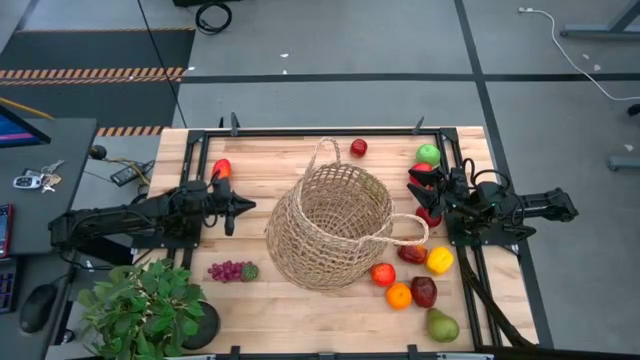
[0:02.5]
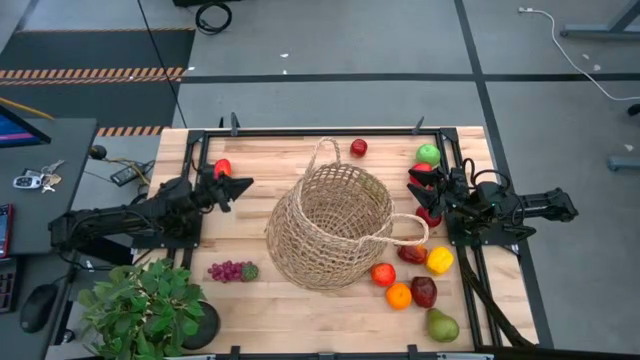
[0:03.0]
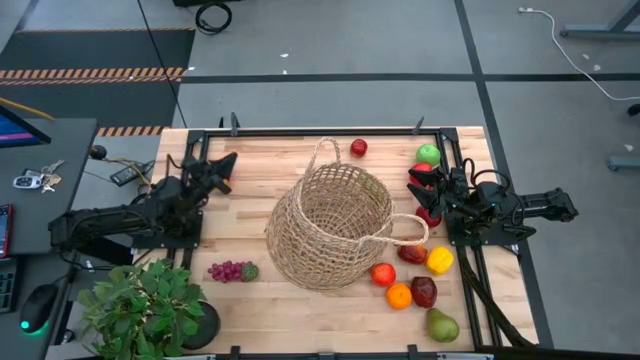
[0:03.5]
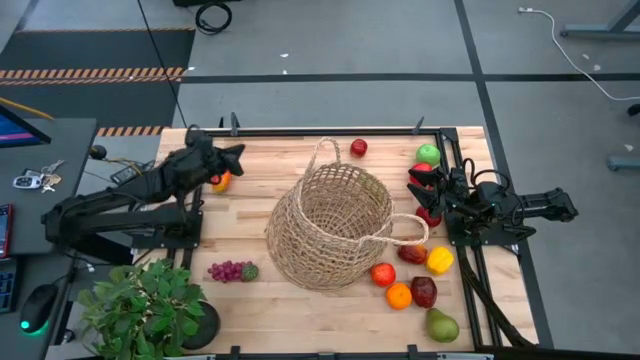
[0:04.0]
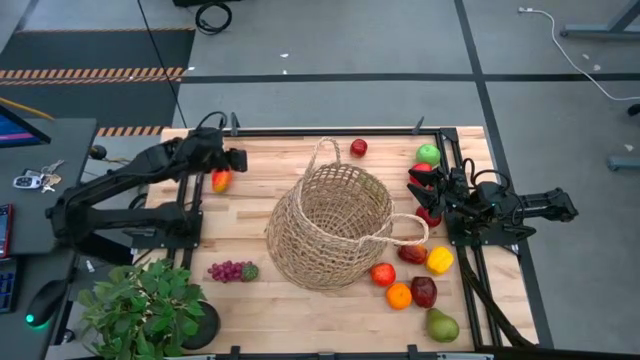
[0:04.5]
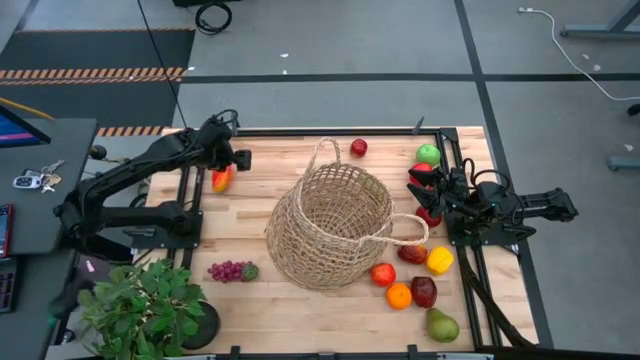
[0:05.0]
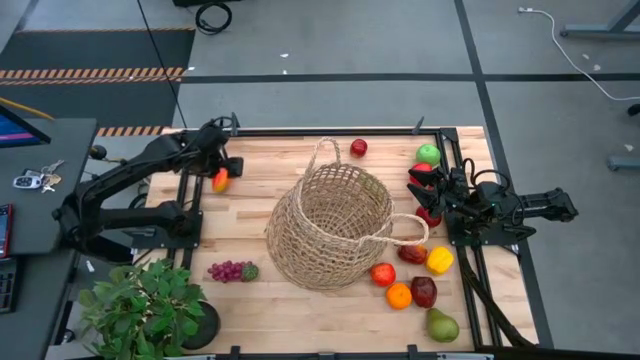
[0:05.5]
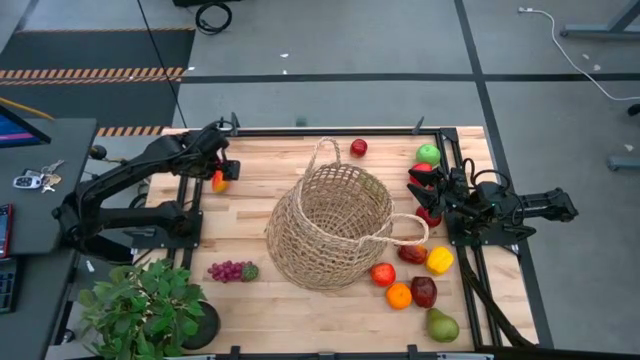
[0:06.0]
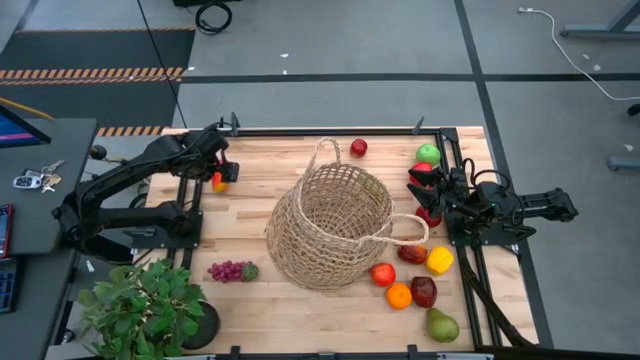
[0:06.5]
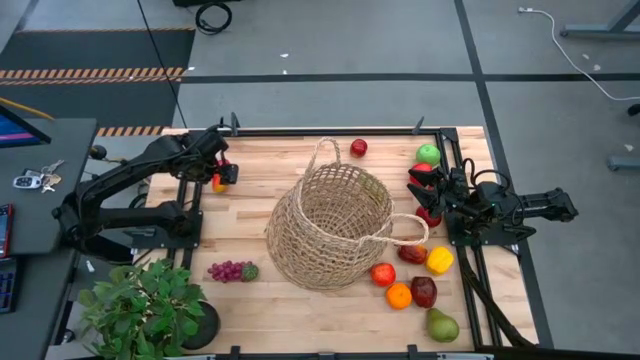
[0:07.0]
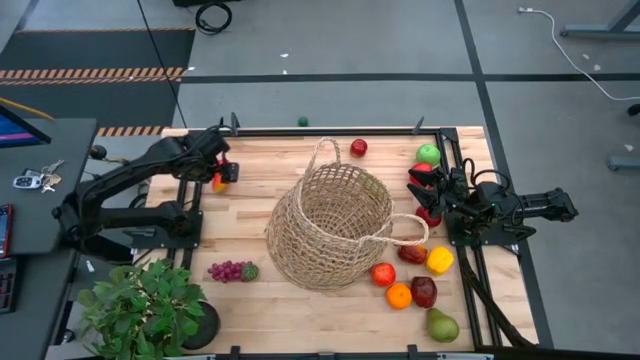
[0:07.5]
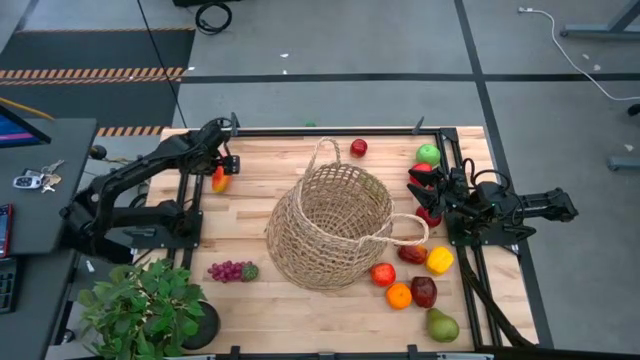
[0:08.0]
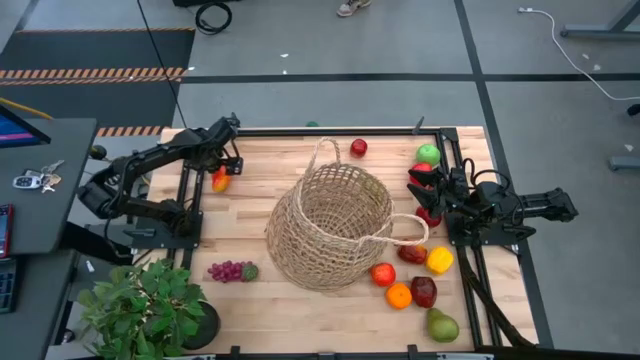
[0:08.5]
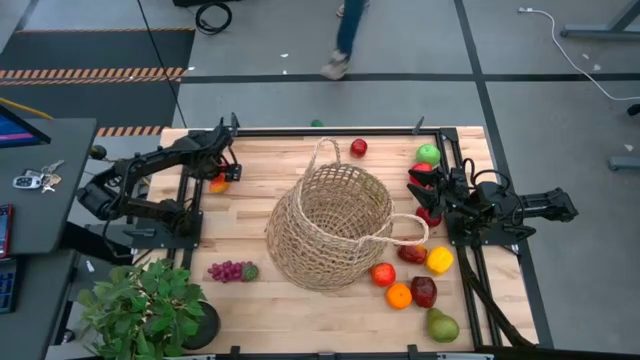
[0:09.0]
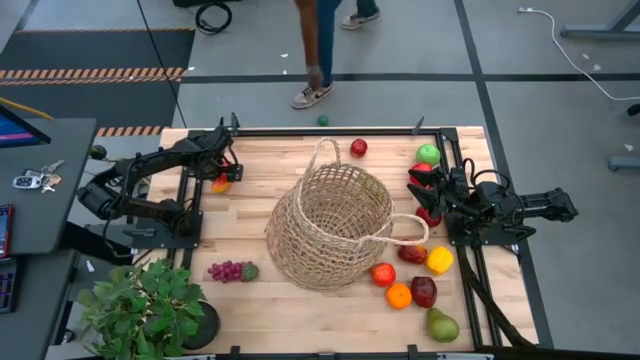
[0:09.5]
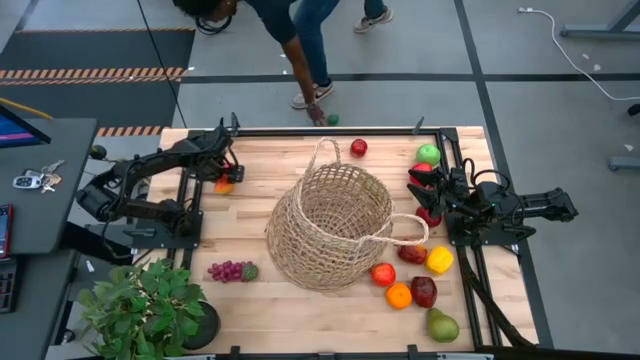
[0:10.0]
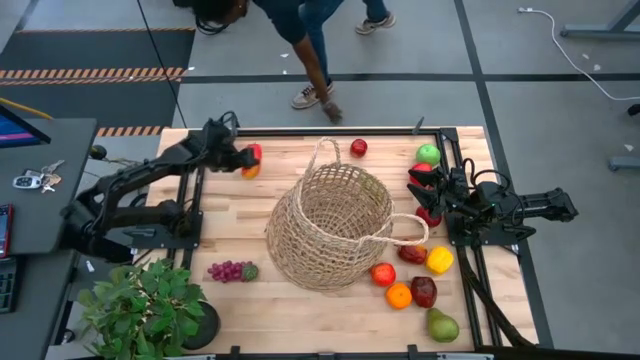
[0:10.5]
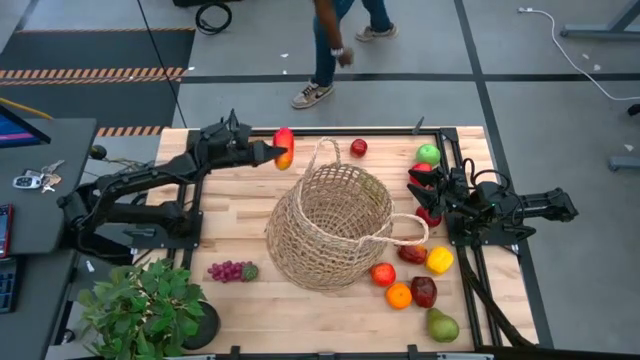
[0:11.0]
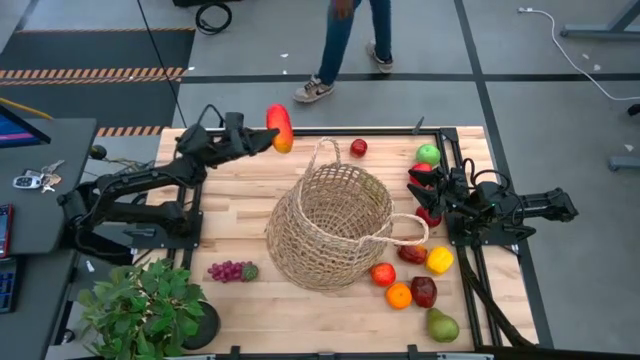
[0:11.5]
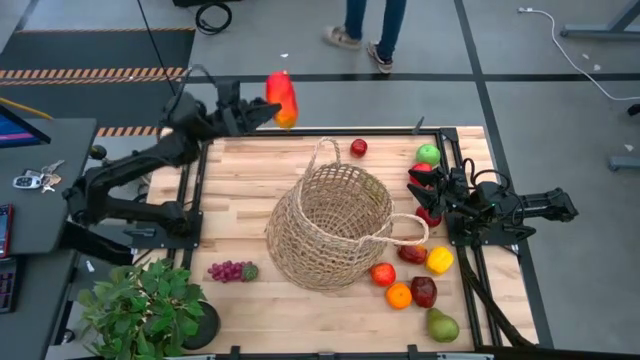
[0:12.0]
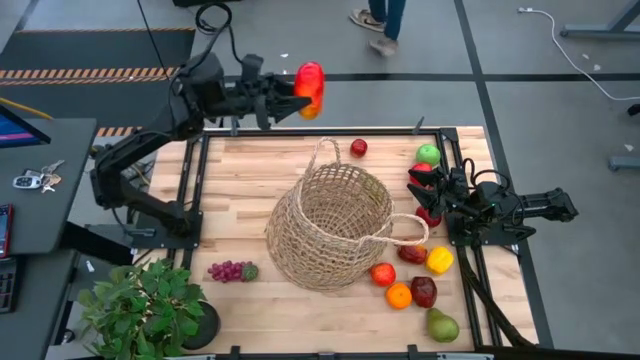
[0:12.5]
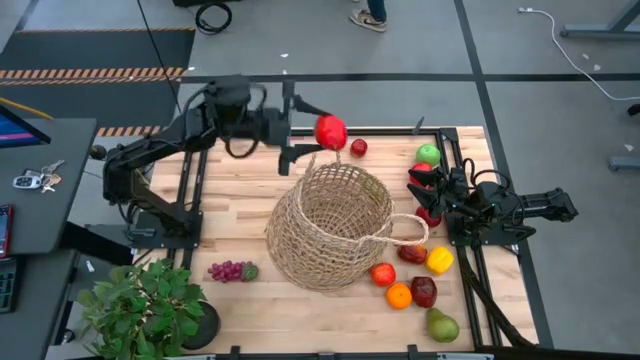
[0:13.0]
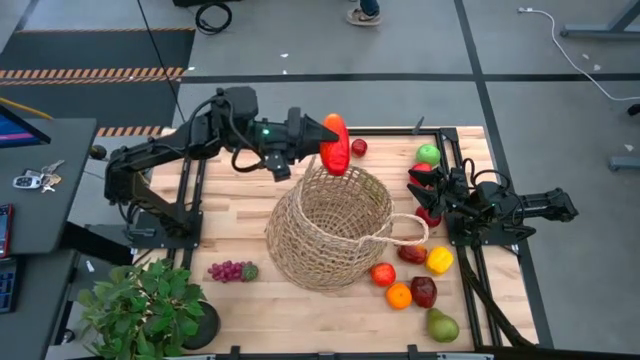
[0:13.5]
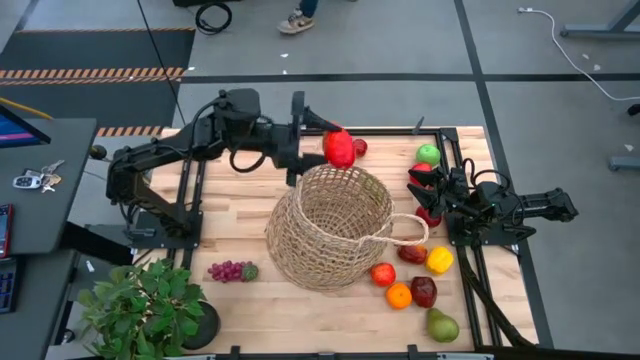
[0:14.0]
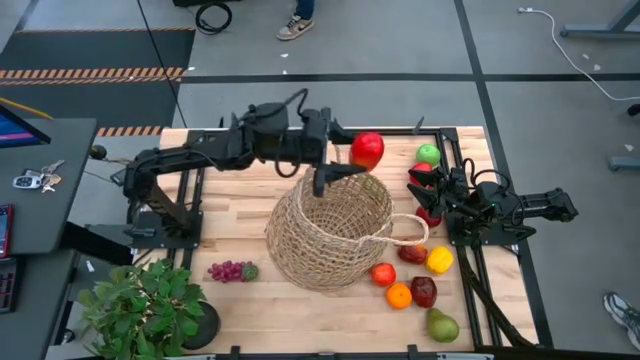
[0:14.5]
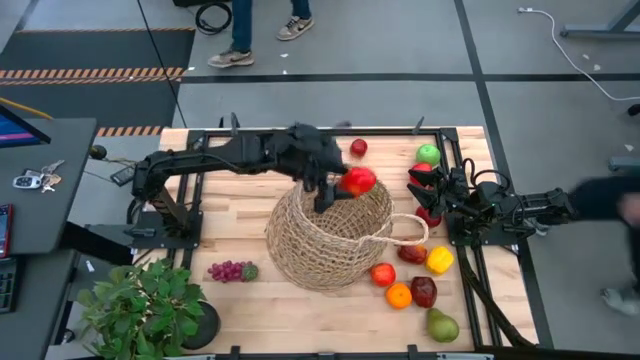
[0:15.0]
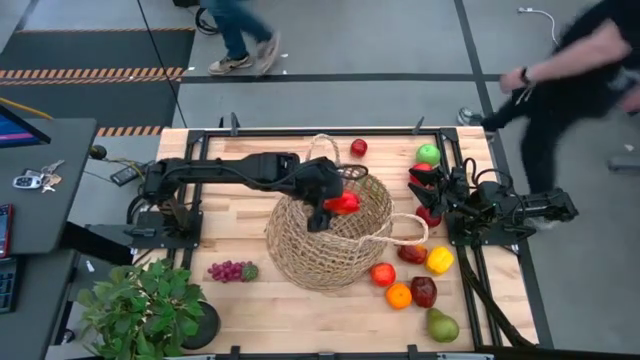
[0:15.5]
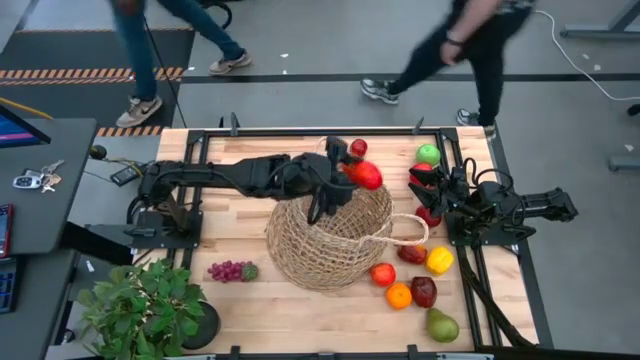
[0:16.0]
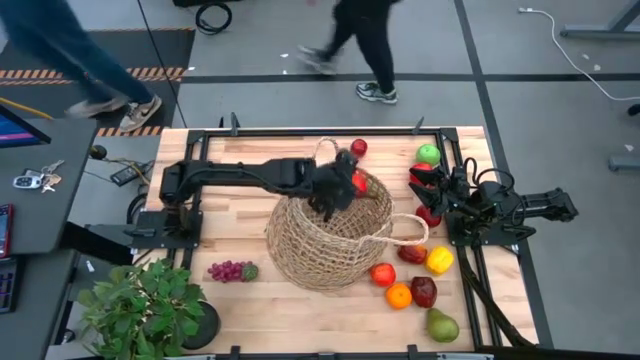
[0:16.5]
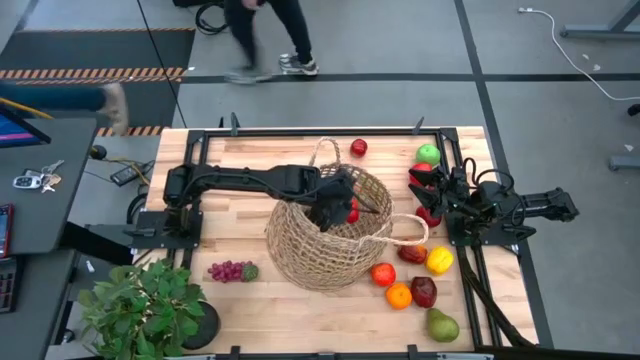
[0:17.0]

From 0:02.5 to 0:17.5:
Task: Build produce basket
Put the red mango into the brown basket

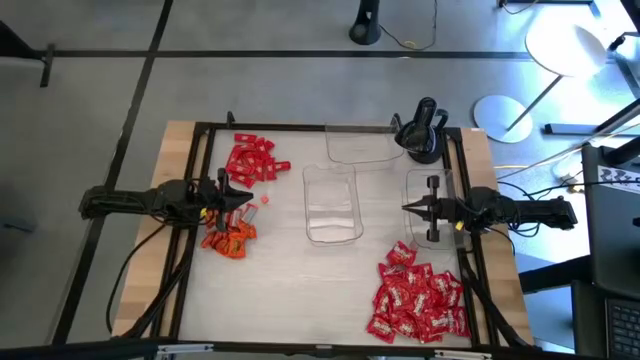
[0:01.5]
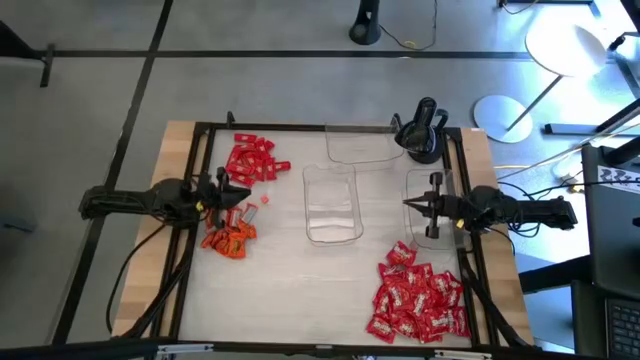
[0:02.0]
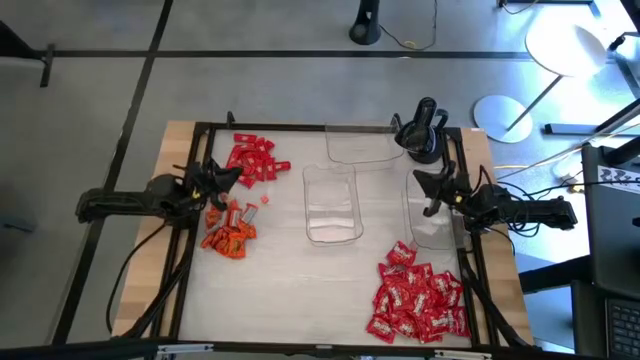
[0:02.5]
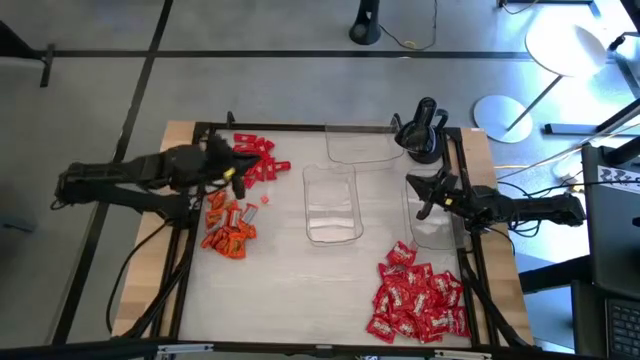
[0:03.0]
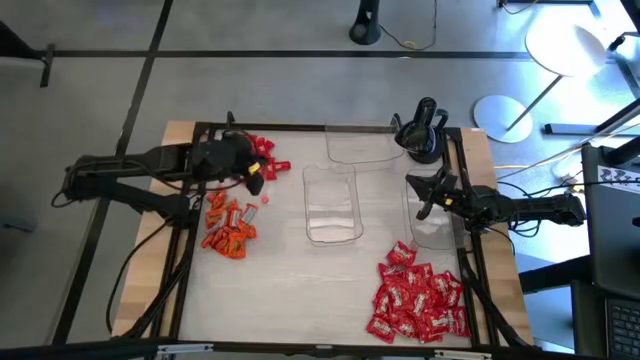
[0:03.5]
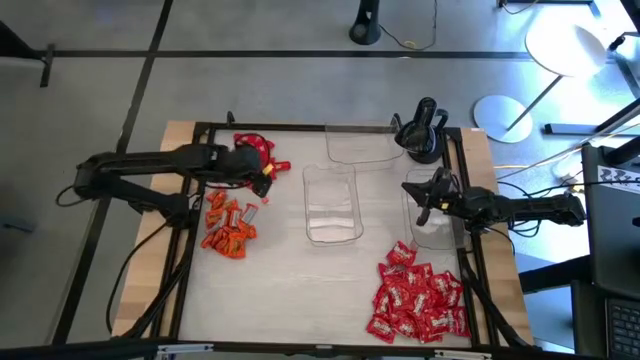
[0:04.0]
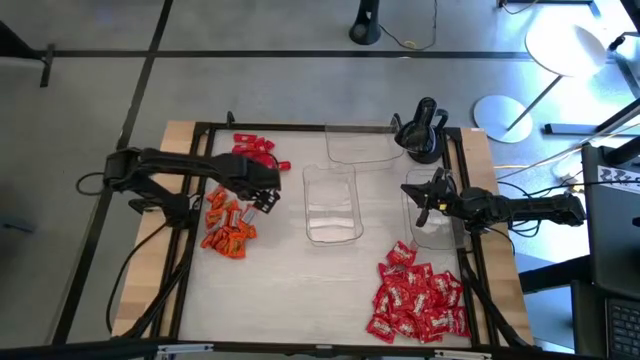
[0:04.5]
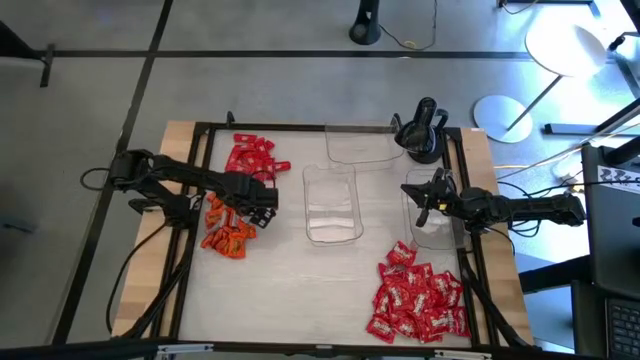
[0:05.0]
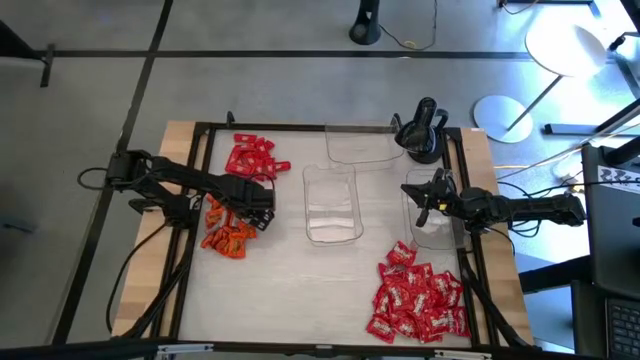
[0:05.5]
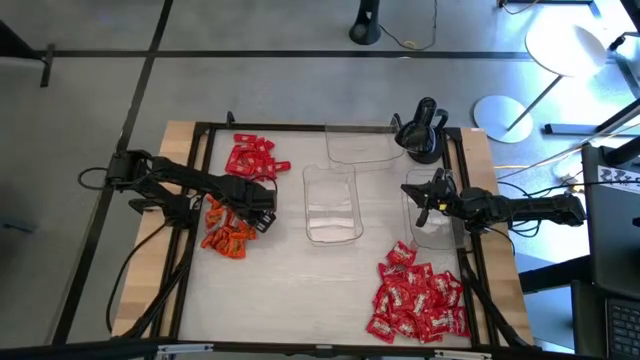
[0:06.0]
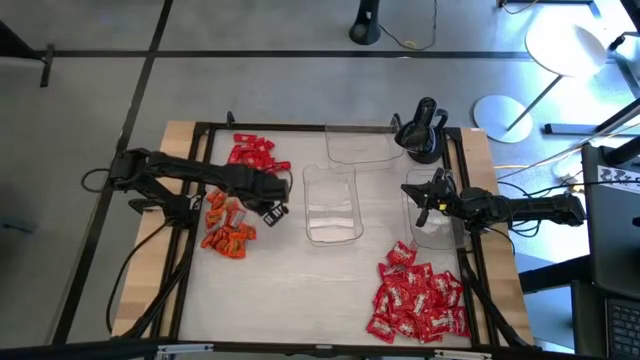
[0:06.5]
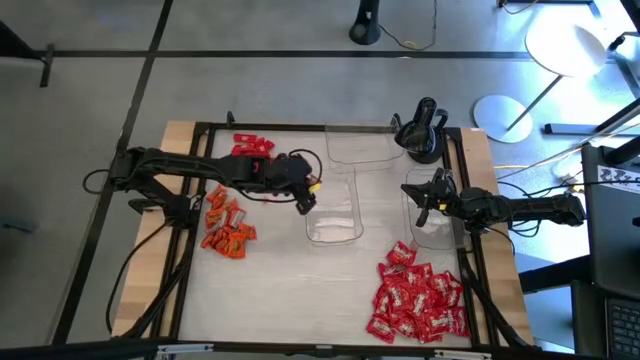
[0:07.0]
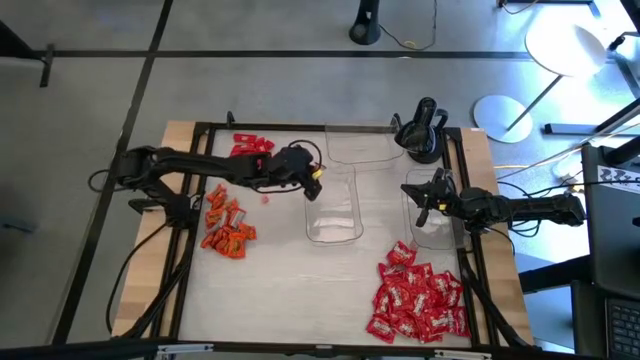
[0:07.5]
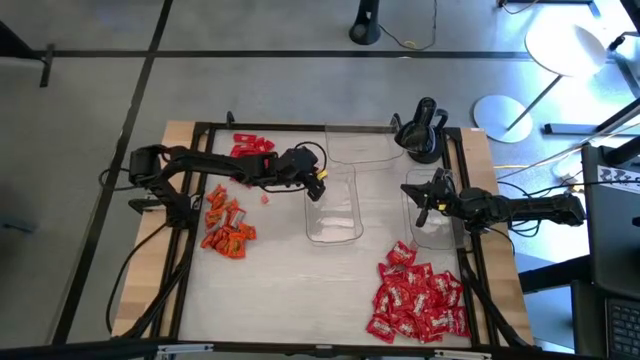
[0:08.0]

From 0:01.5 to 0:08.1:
Task: Sort candy
Put the orange chocolate into the bottom left transparent bin
